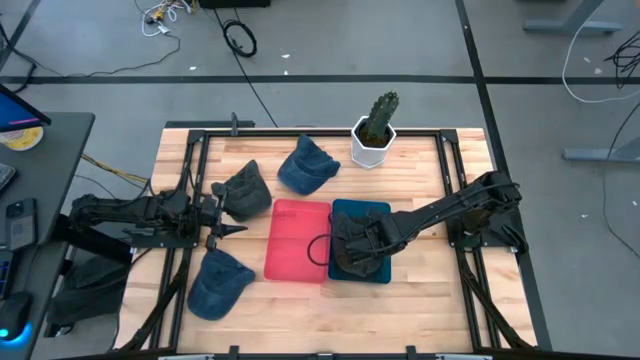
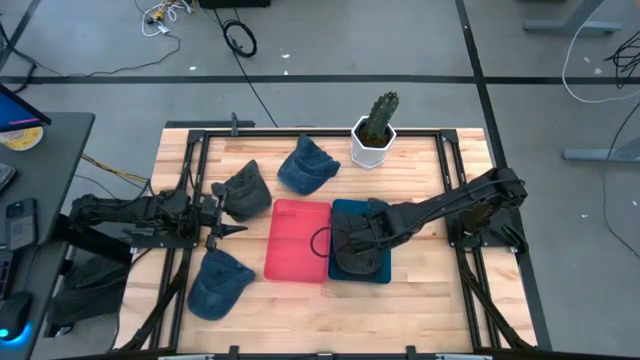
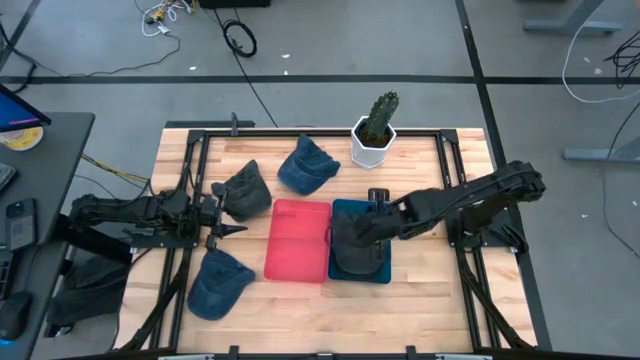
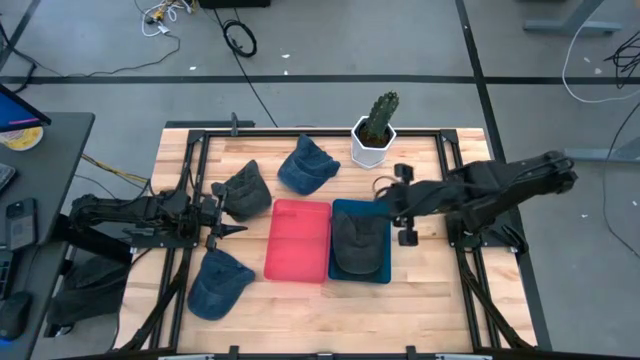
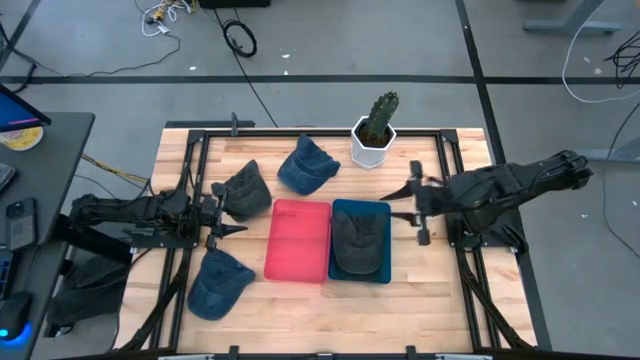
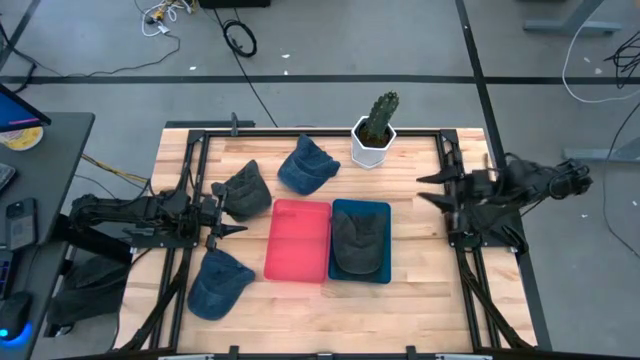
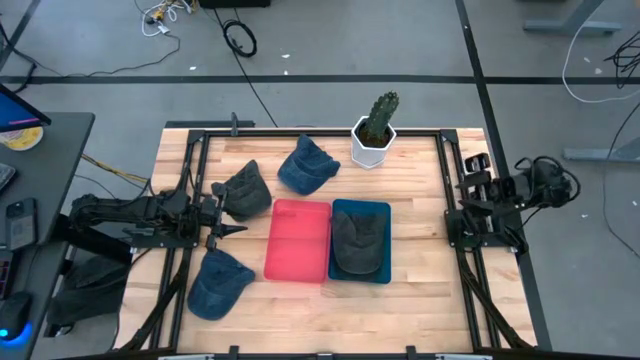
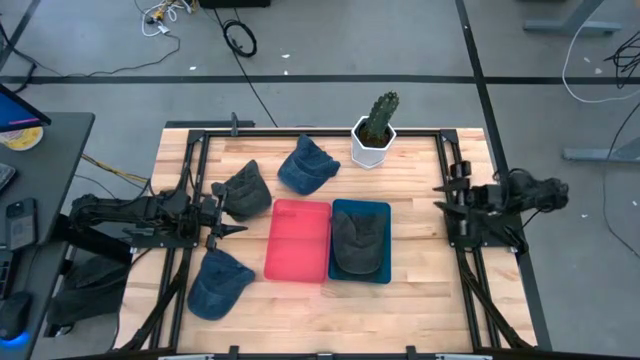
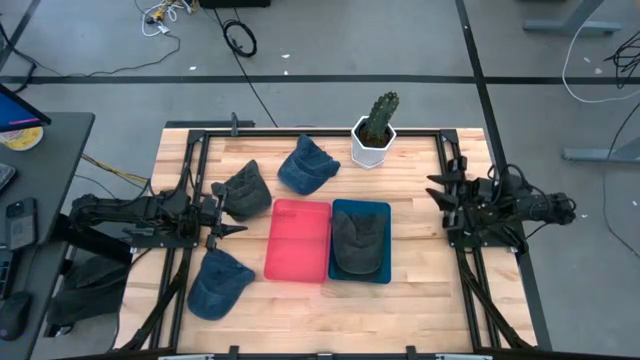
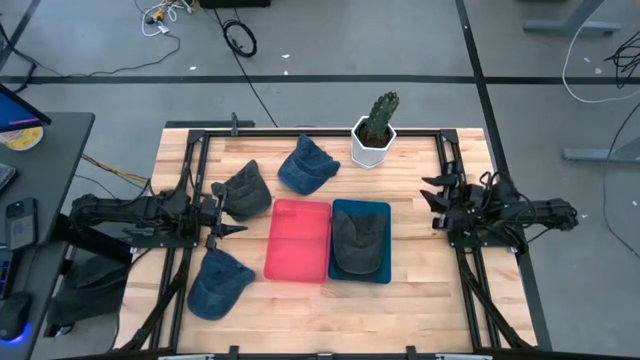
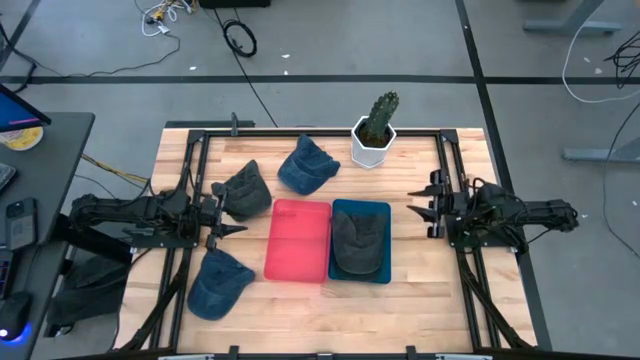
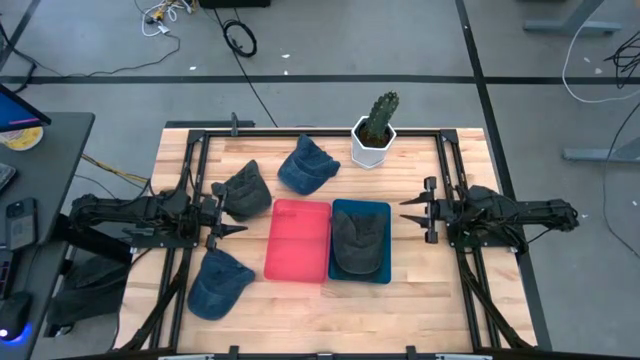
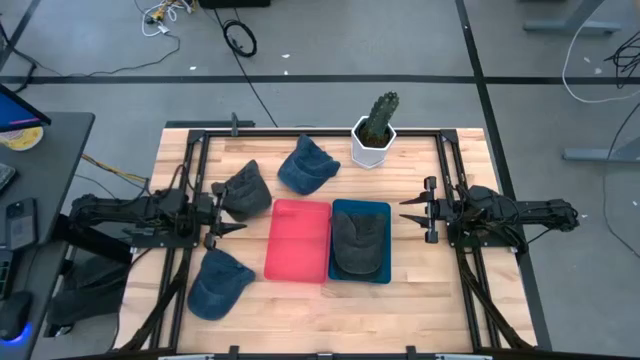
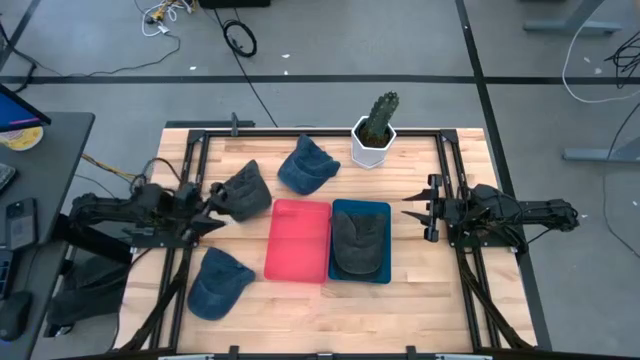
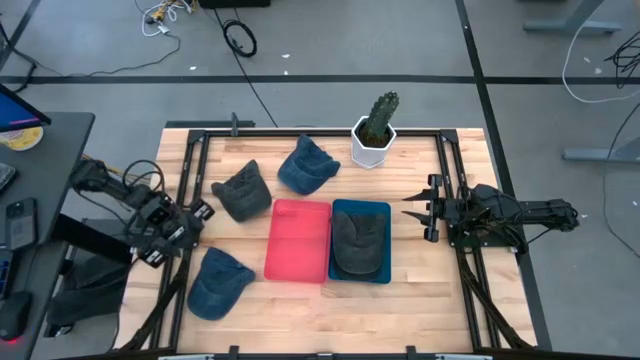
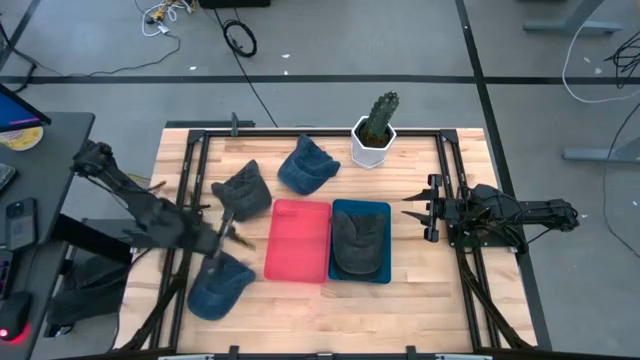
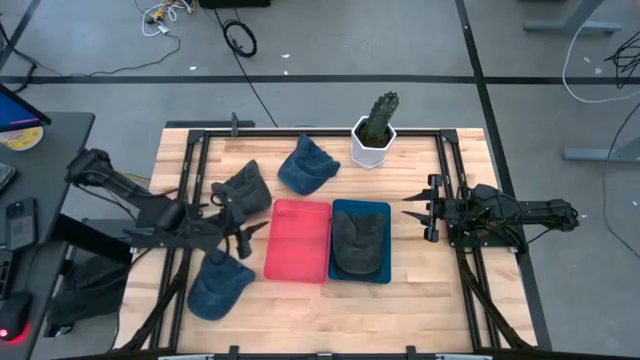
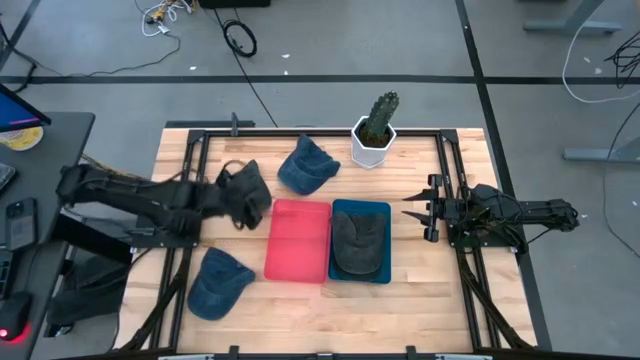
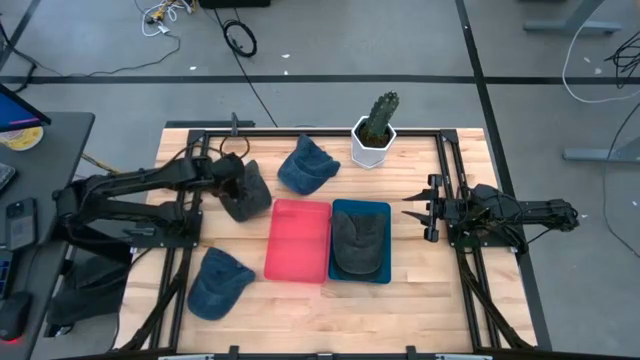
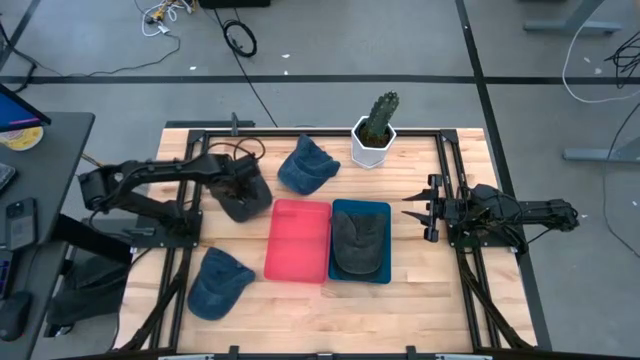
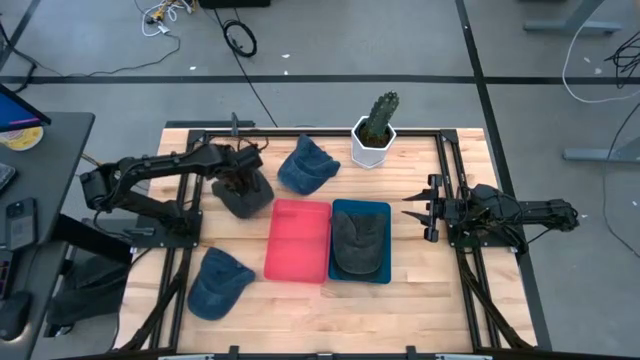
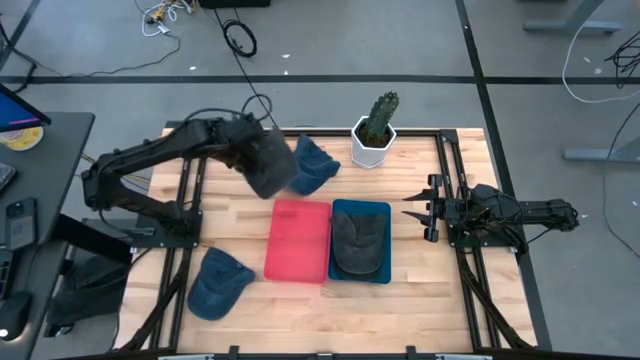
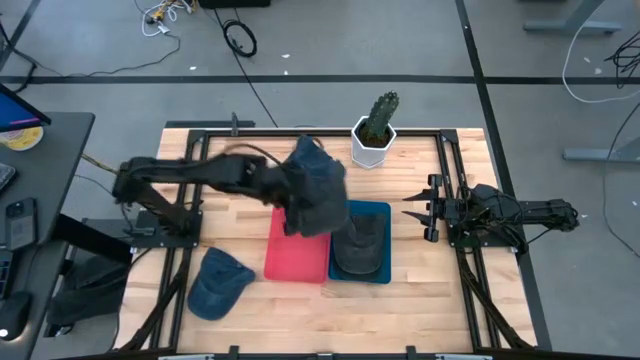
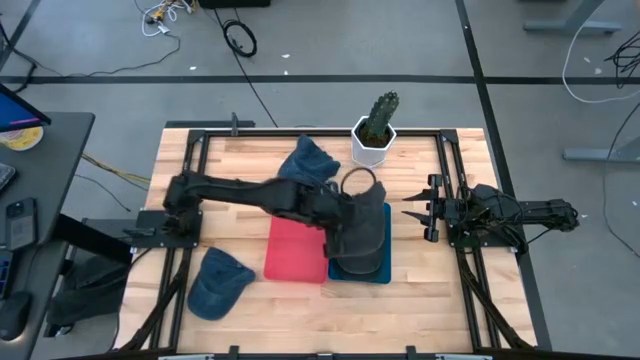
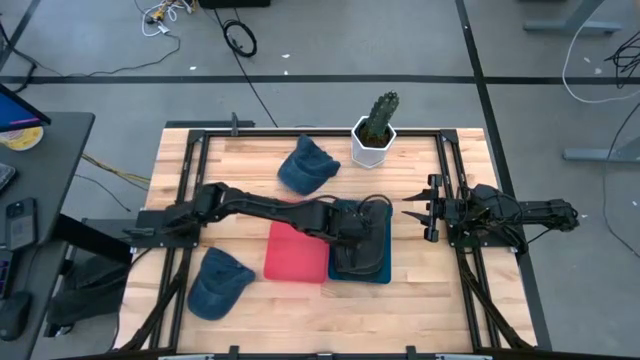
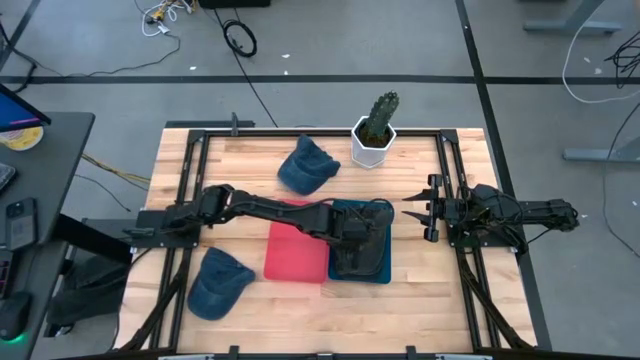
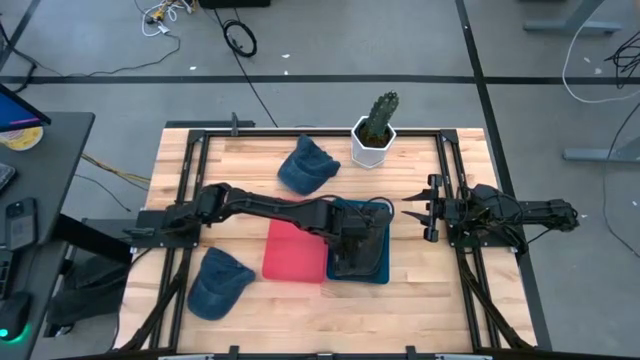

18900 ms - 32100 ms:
Task: Pick & Place hat
Put the black cap into the blue bin

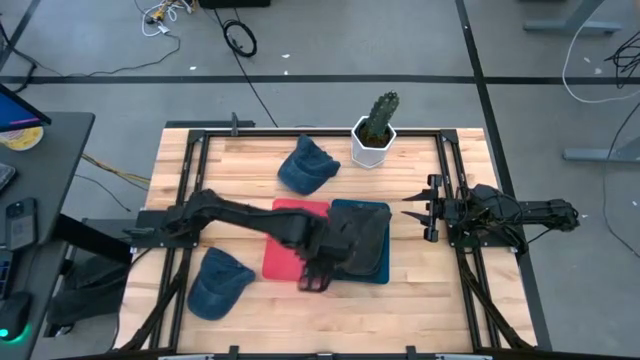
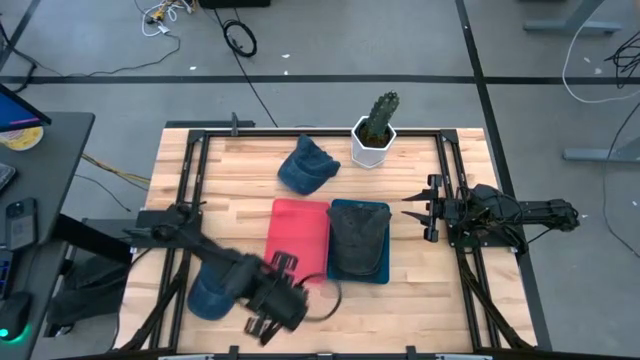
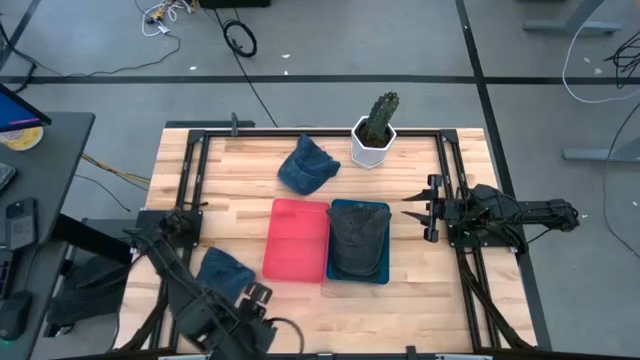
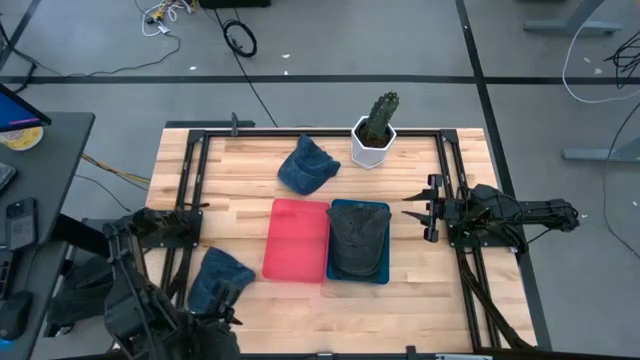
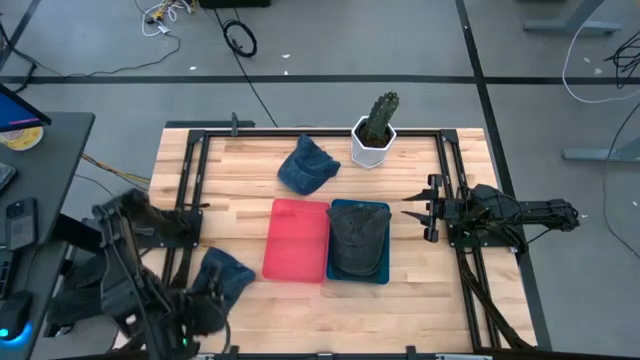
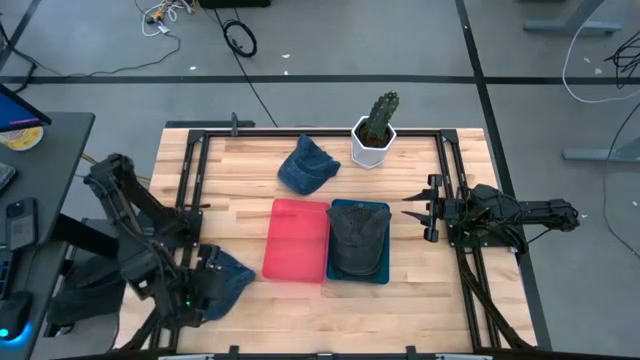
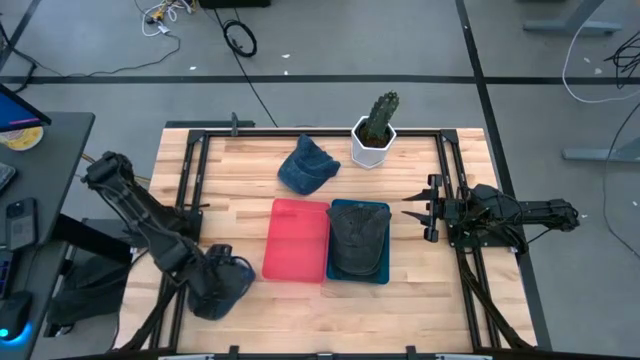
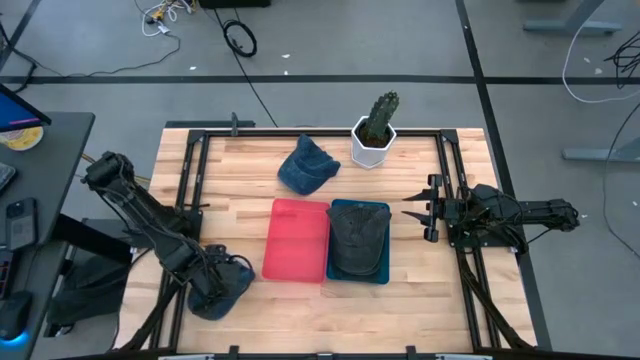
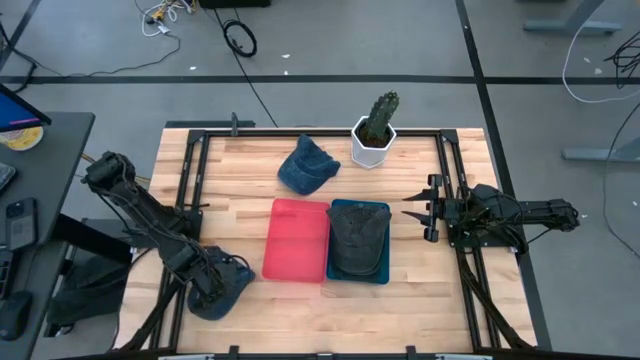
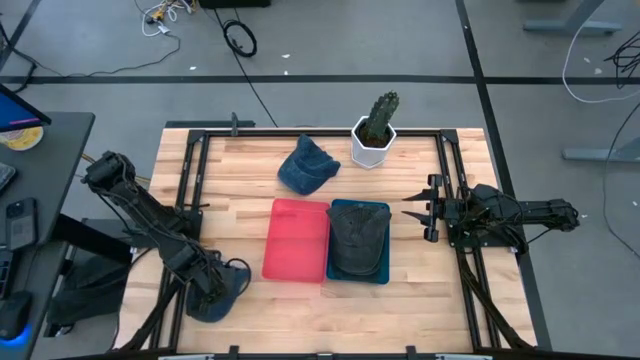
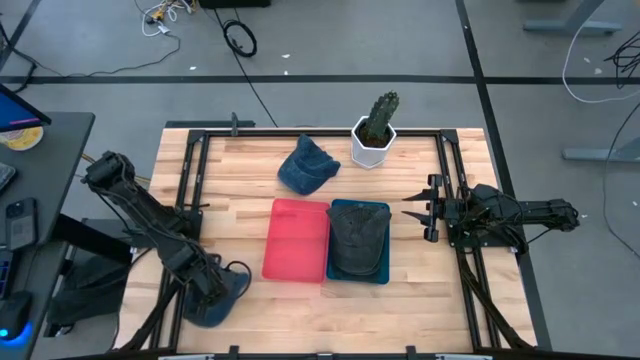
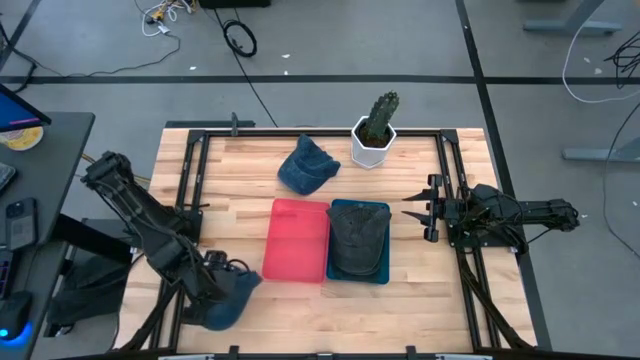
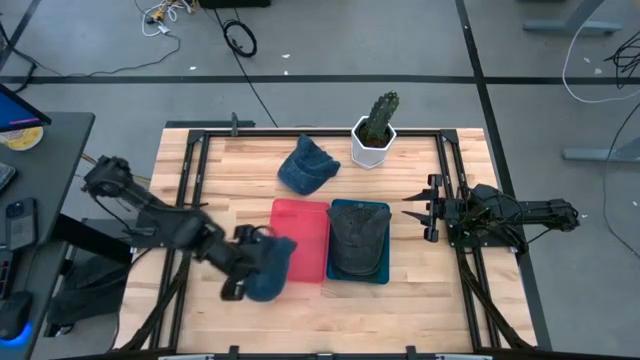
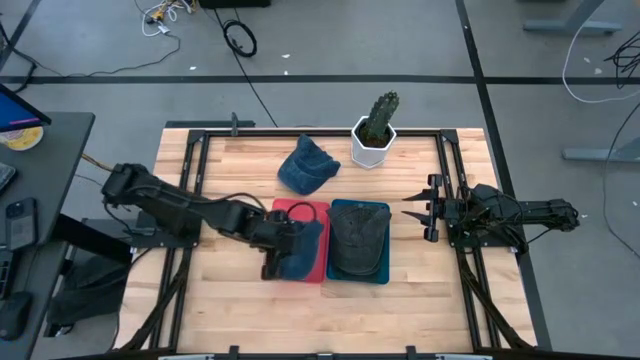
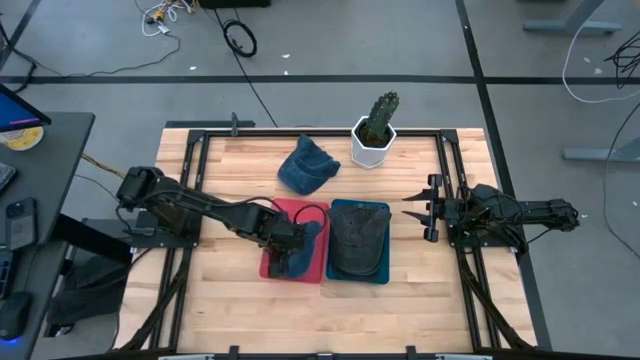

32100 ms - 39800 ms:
Put the bottom blue cap into the pink bin
